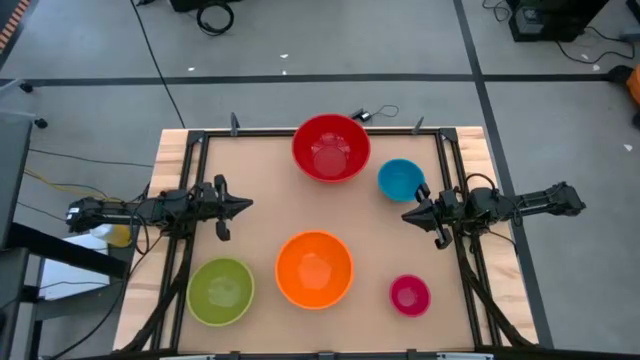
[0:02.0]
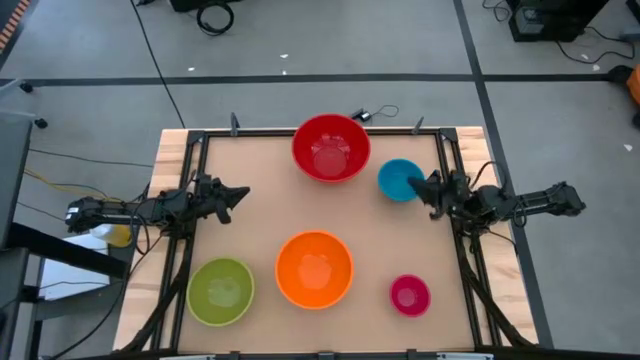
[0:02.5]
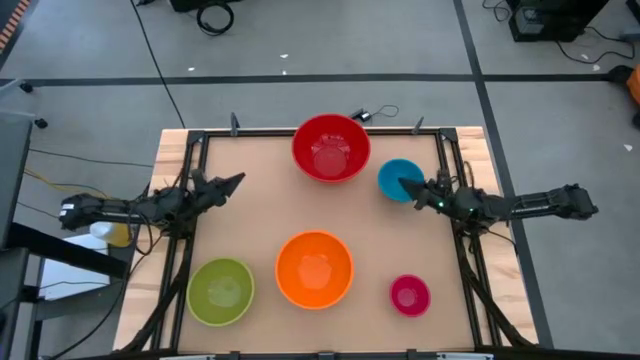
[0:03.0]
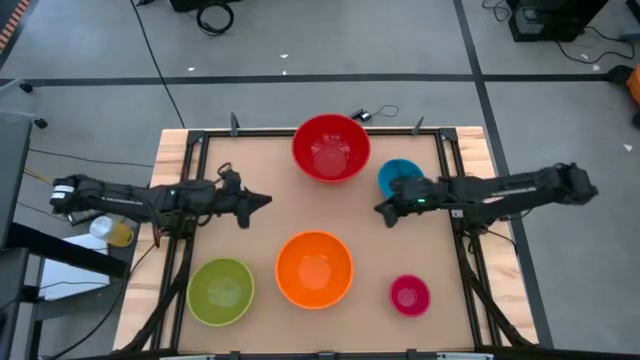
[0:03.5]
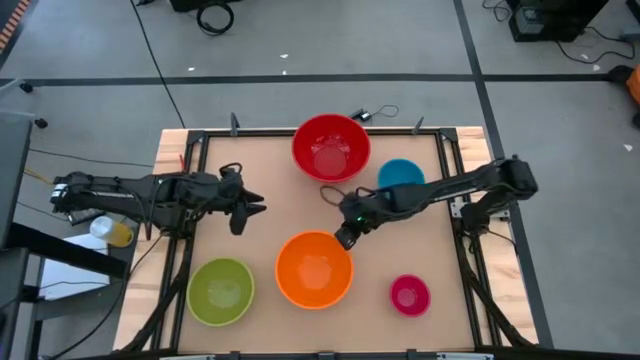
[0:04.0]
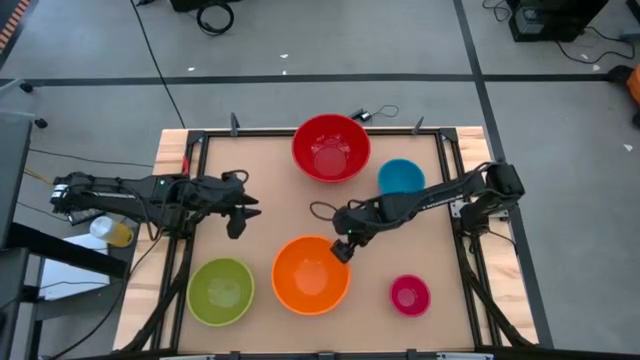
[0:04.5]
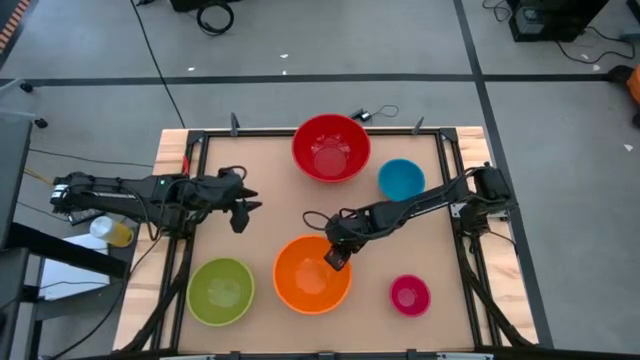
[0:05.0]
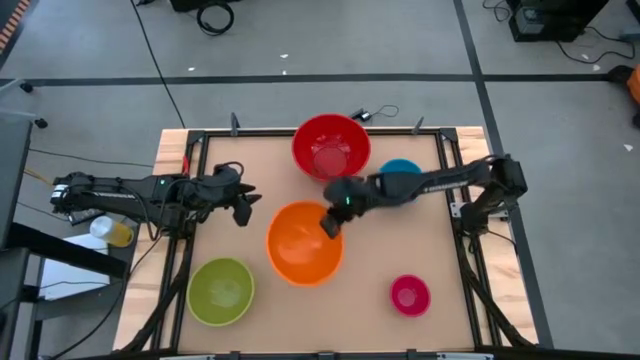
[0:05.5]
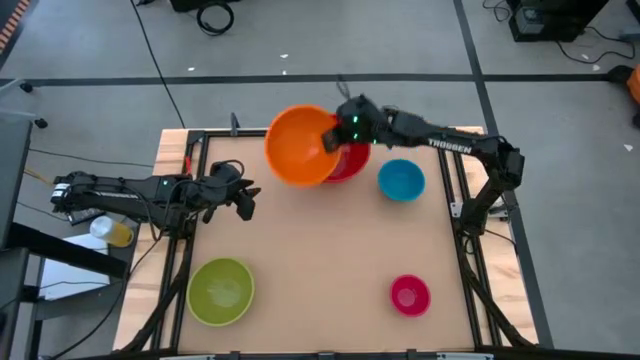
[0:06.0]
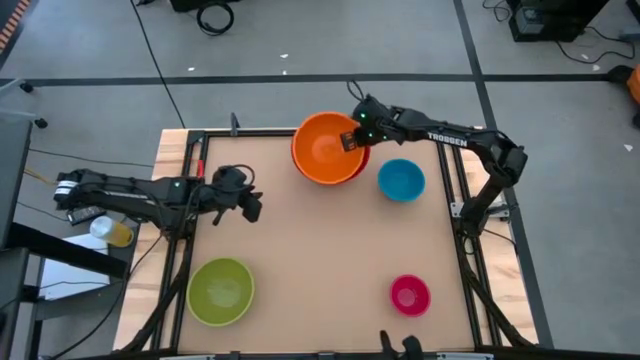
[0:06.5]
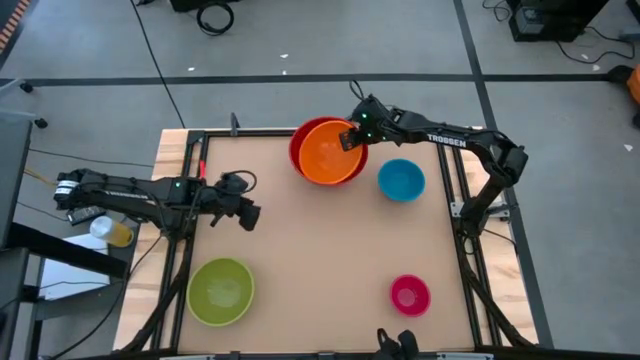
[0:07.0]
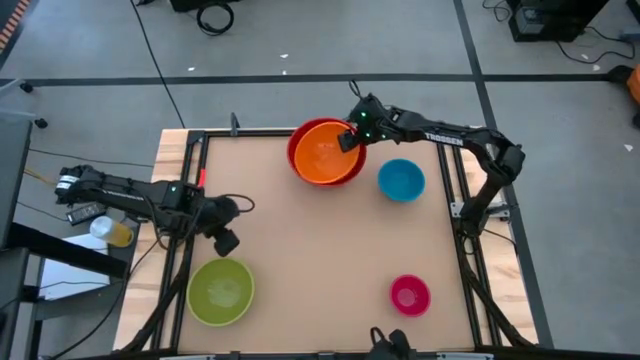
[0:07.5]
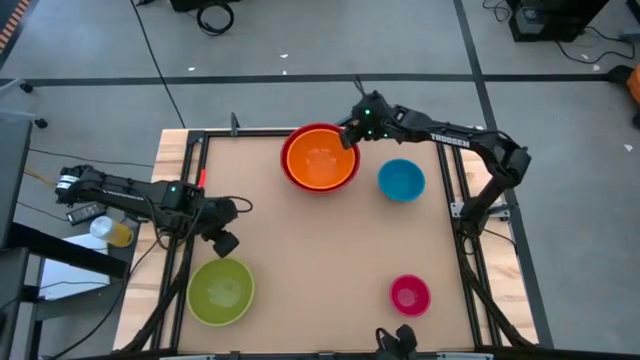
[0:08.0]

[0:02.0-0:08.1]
Stack the orange bowl on top of the red bowl

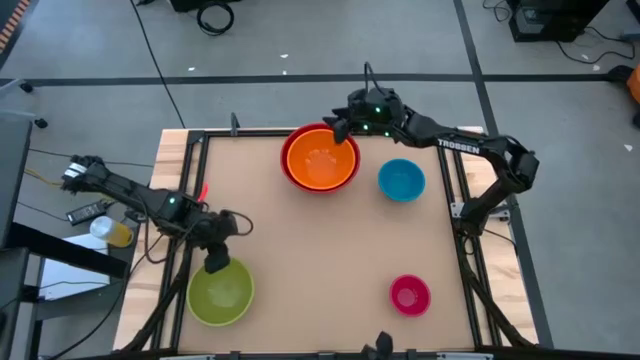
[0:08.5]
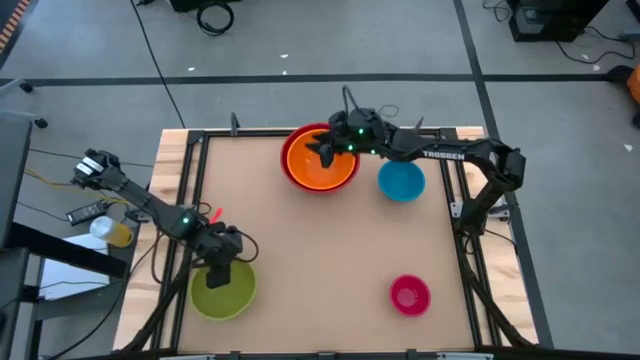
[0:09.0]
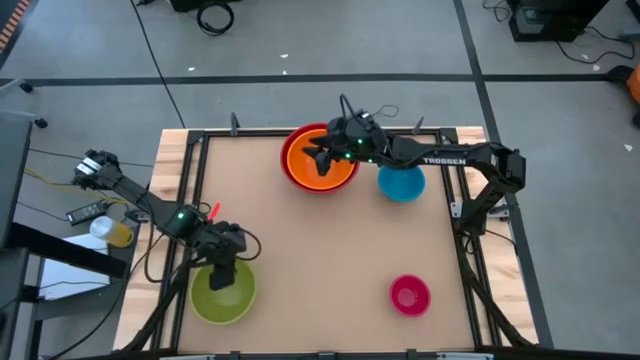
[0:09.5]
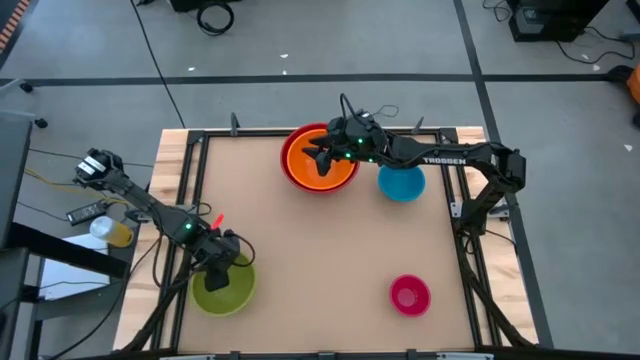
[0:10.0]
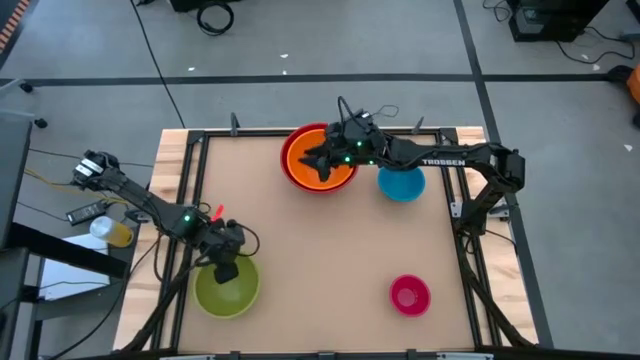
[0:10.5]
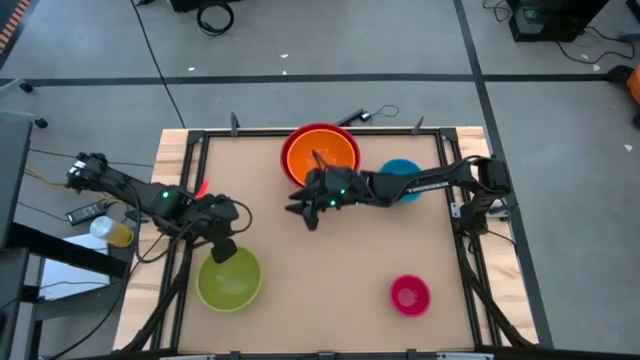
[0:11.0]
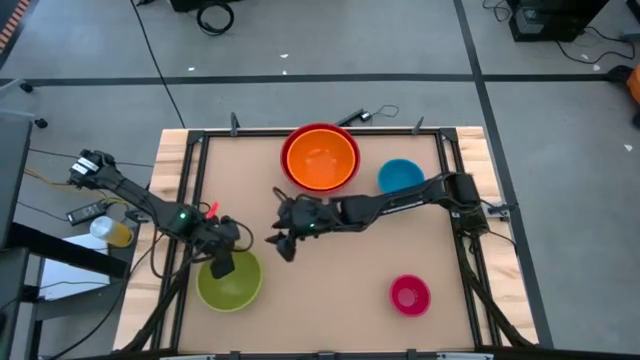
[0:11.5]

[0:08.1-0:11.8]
Stack the green bowl on top of the orange bowl

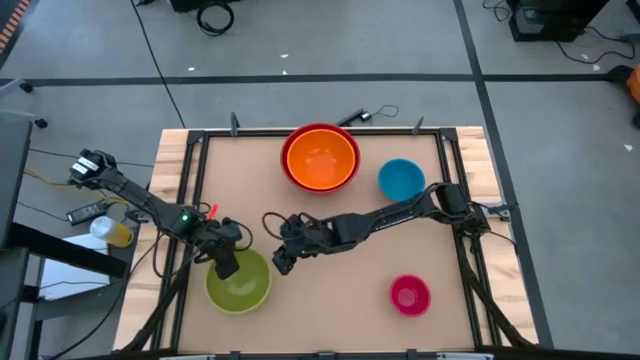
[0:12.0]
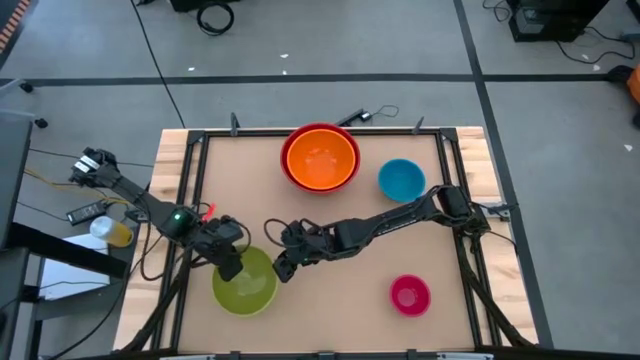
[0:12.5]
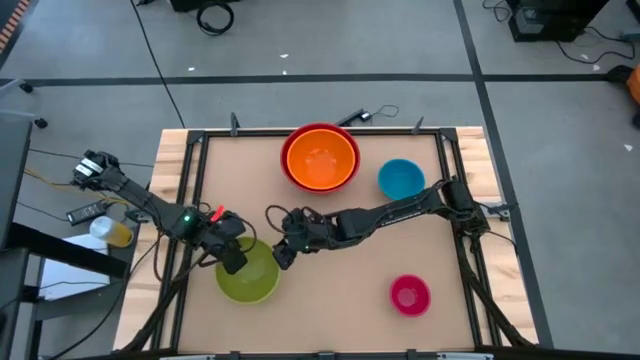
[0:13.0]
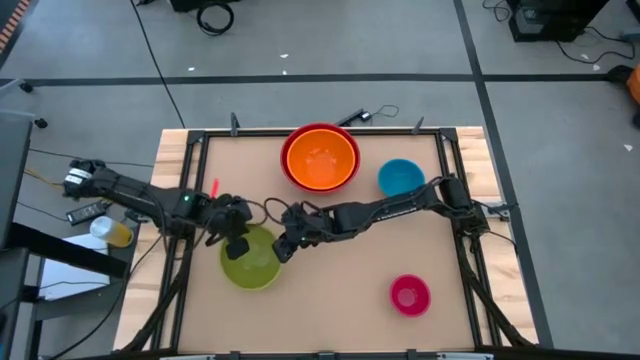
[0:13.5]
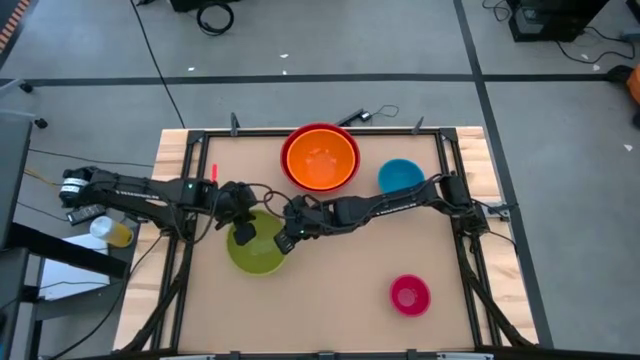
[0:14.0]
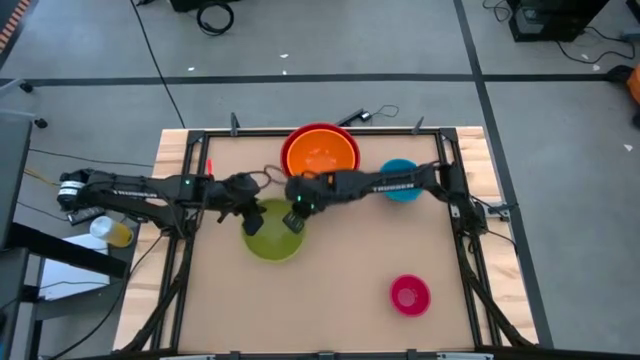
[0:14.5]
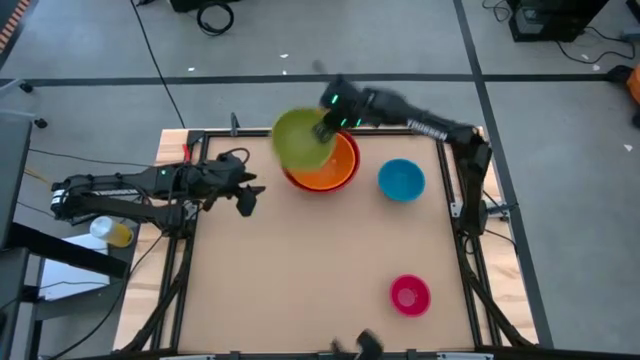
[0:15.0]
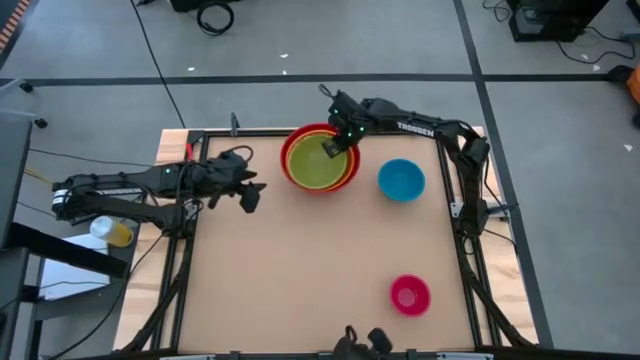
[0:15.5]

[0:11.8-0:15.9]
Stack the green bowl on top of the orange bowl

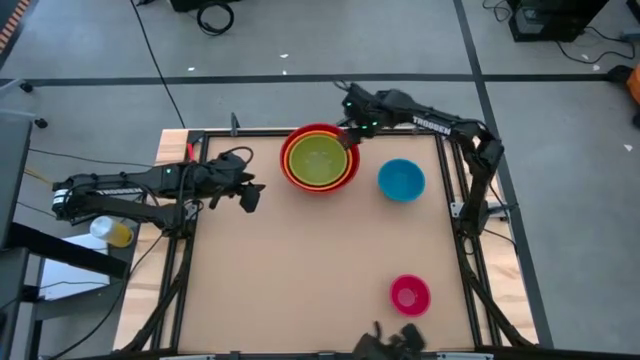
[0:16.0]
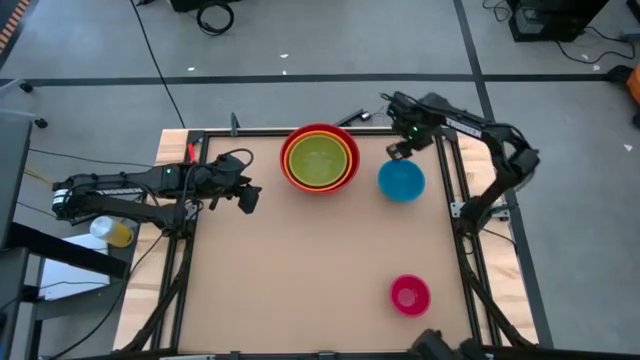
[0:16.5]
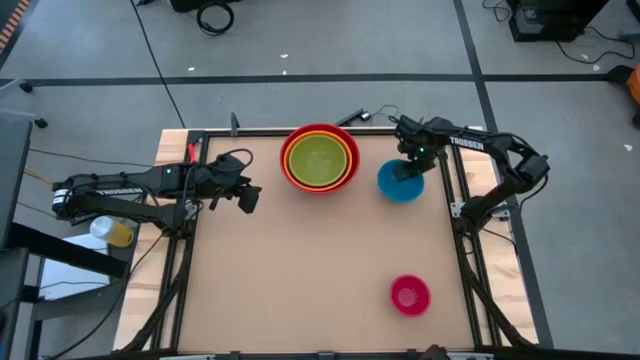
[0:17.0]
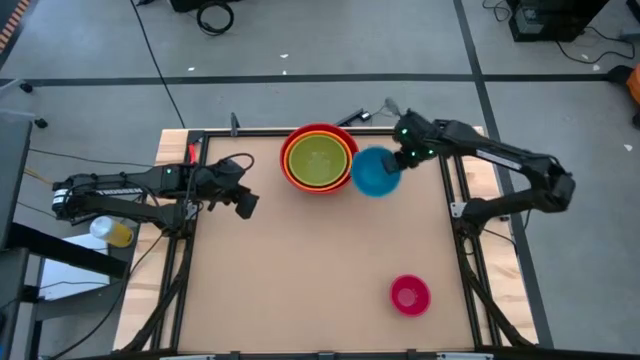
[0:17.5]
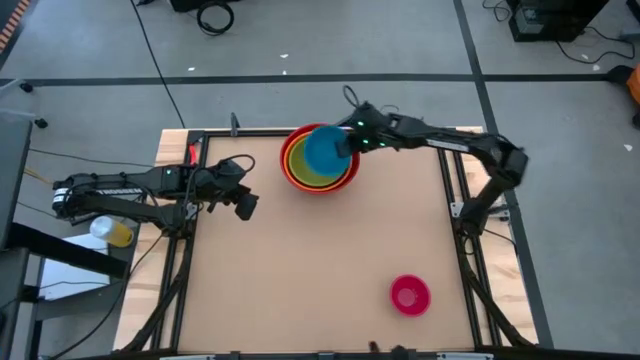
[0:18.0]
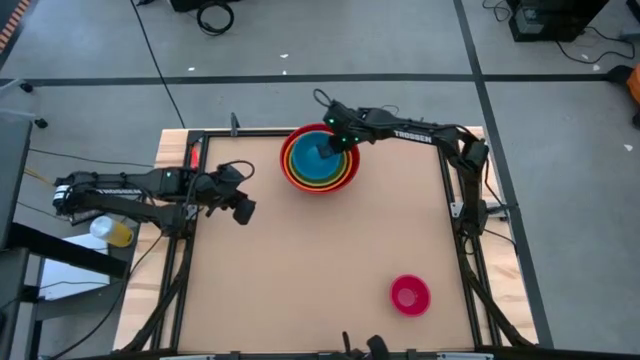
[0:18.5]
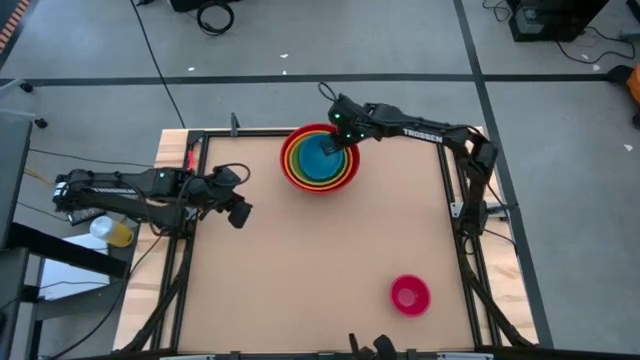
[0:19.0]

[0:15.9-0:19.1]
Stack the blue bowl on top of the green bowl

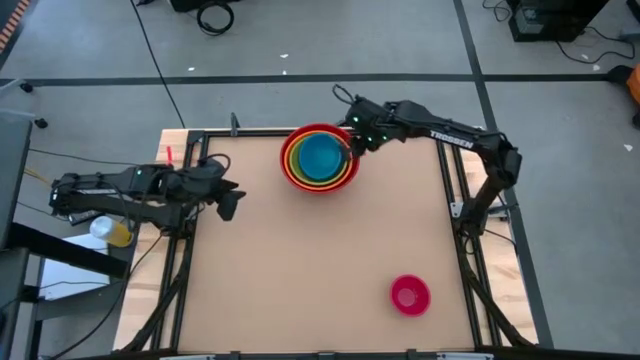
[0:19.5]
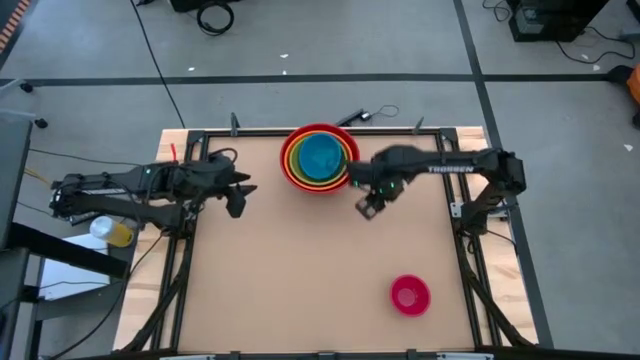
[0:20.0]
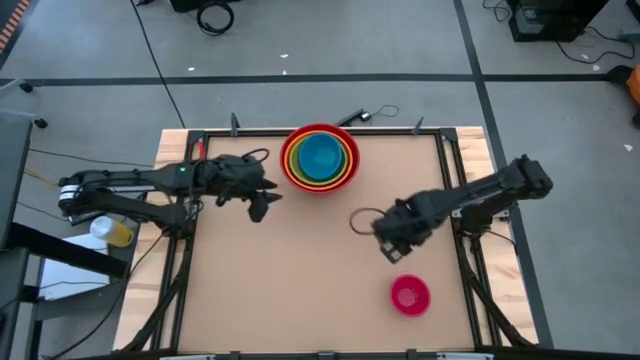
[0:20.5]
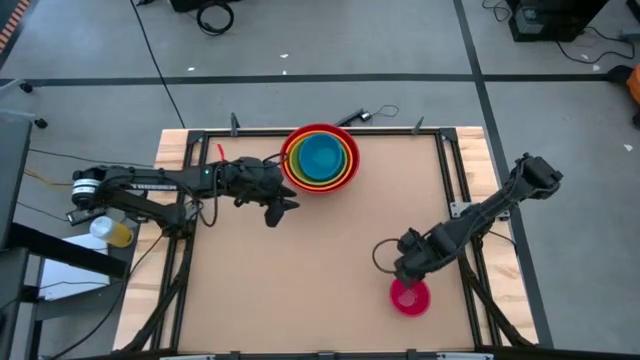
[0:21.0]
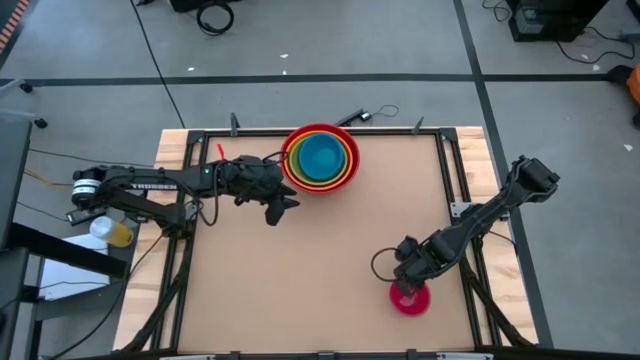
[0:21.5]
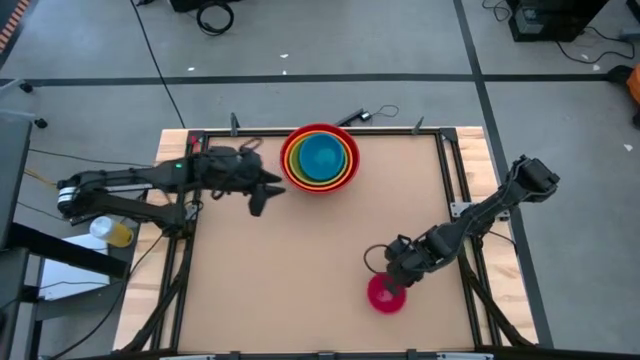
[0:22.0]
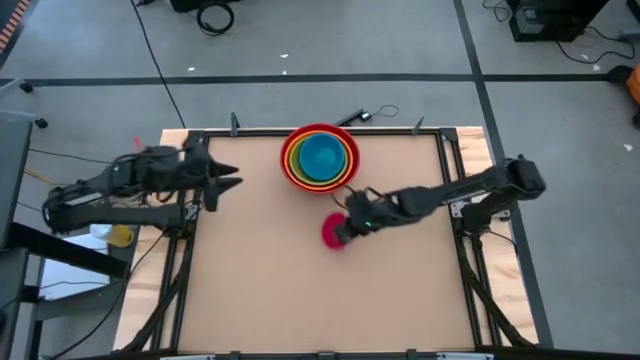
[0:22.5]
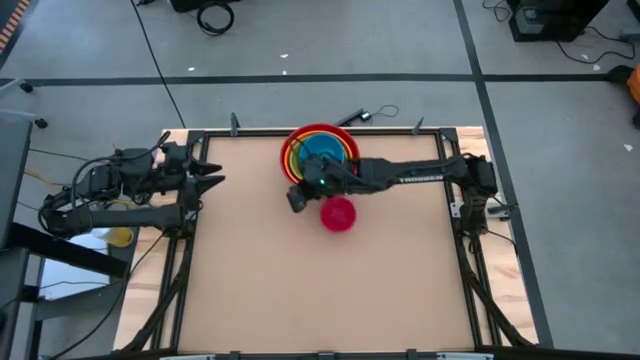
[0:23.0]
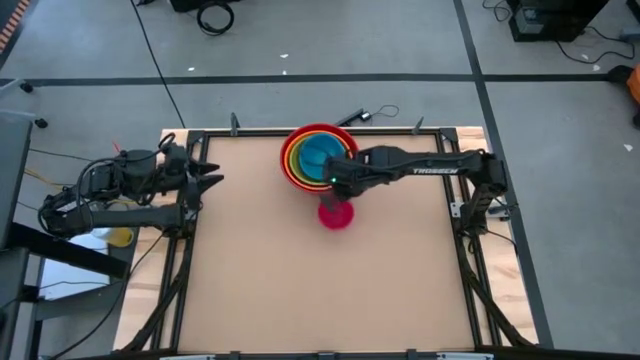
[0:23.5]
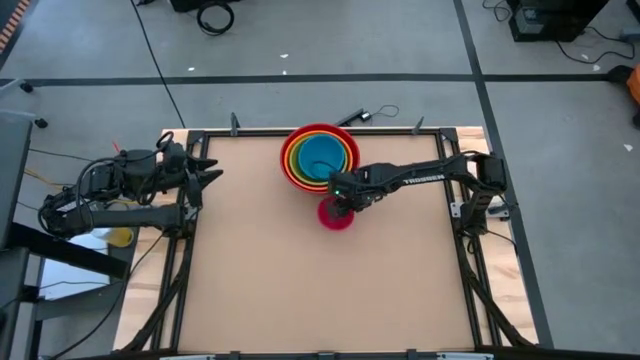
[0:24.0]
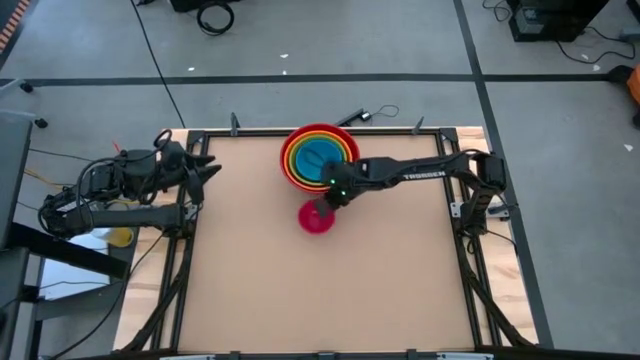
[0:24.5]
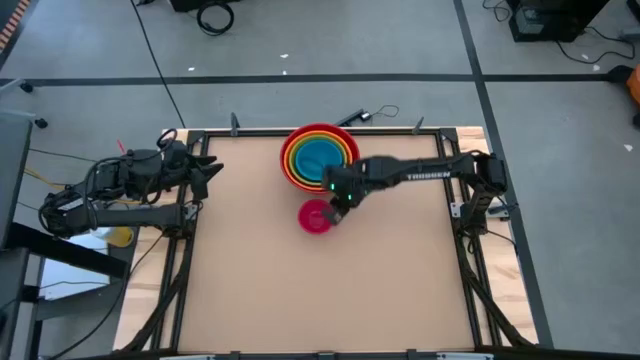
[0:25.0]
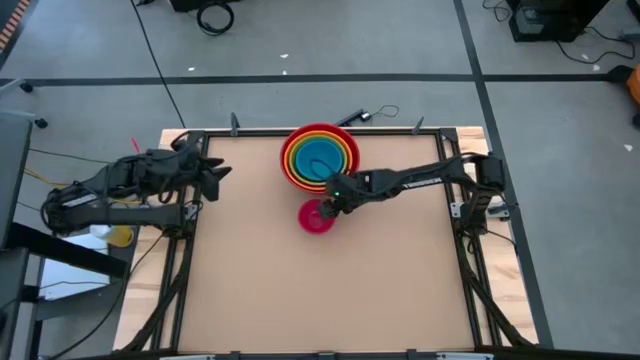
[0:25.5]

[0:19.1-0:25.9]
Stack the pink bowl on top of the blue bowl
